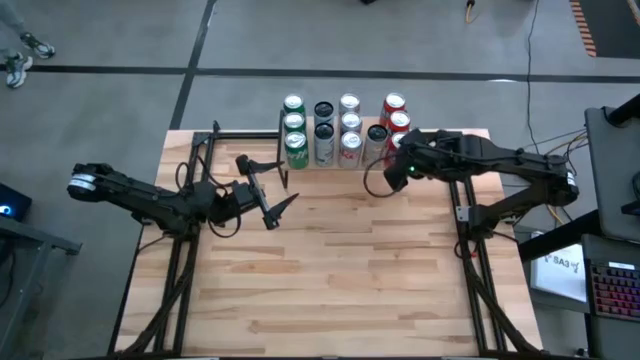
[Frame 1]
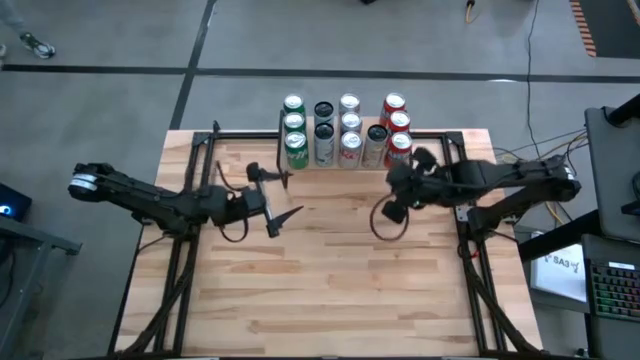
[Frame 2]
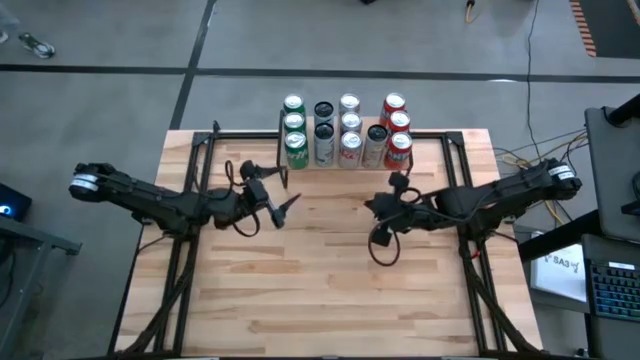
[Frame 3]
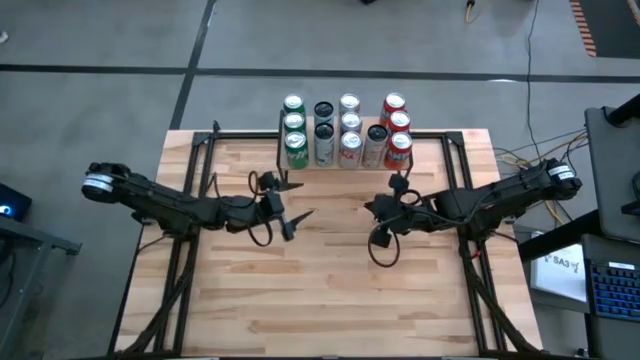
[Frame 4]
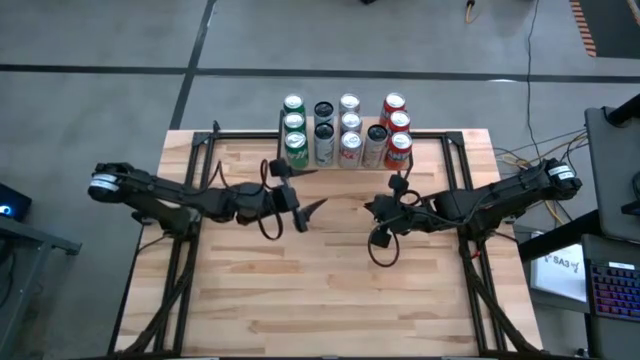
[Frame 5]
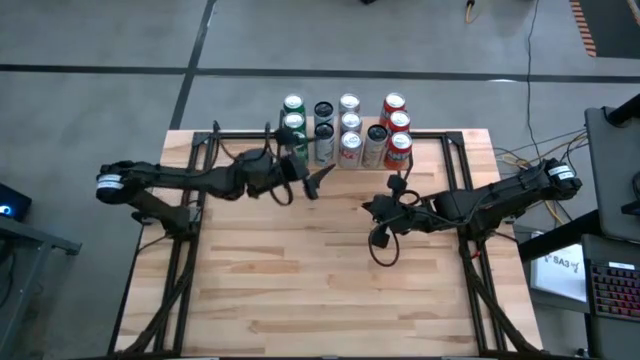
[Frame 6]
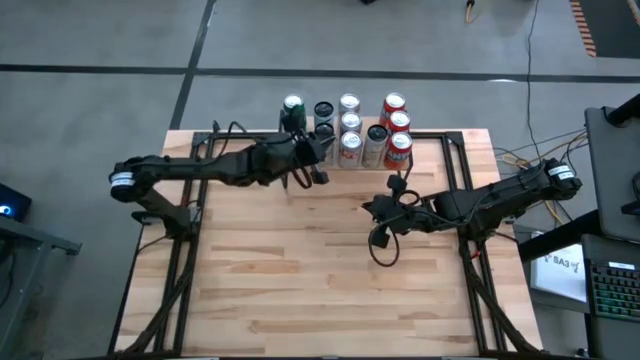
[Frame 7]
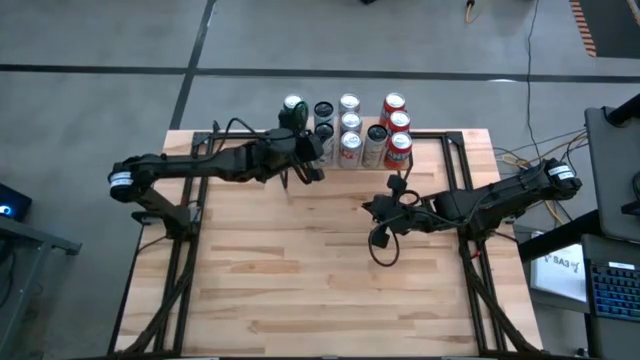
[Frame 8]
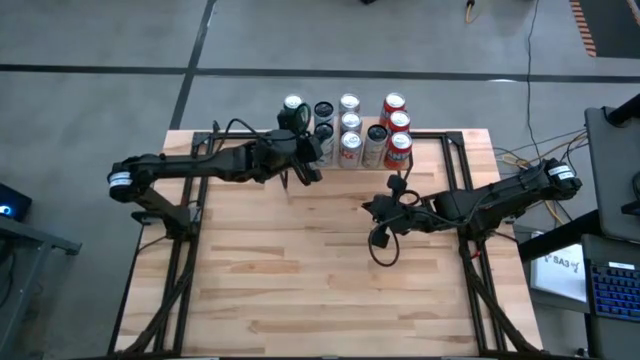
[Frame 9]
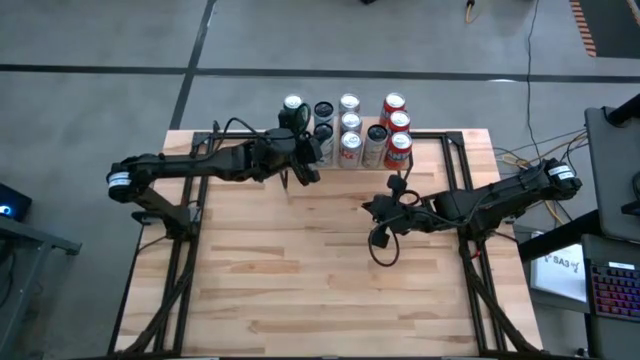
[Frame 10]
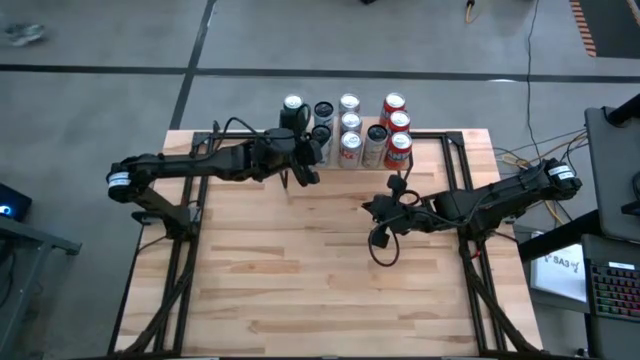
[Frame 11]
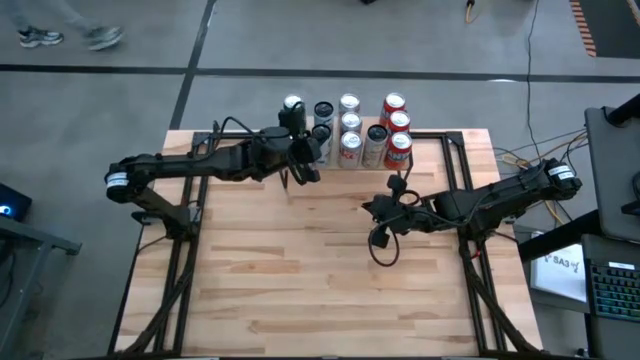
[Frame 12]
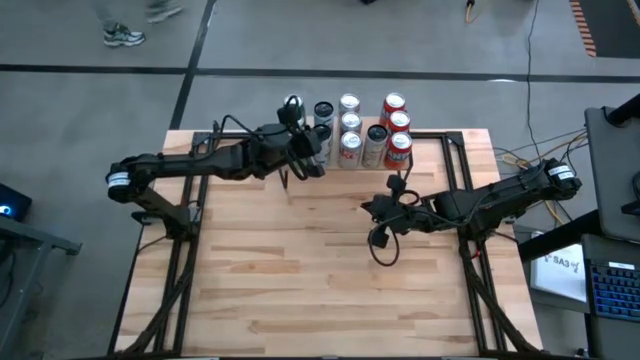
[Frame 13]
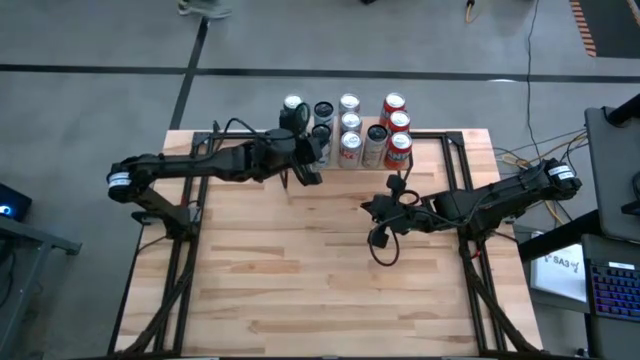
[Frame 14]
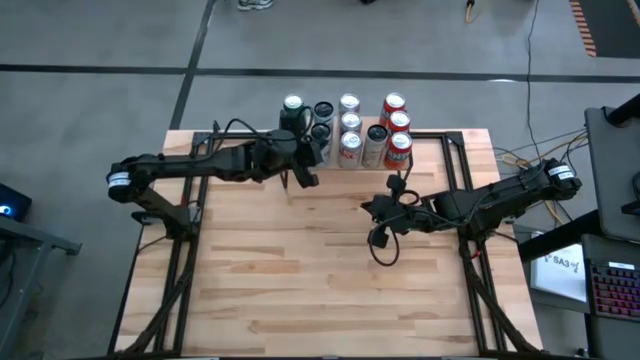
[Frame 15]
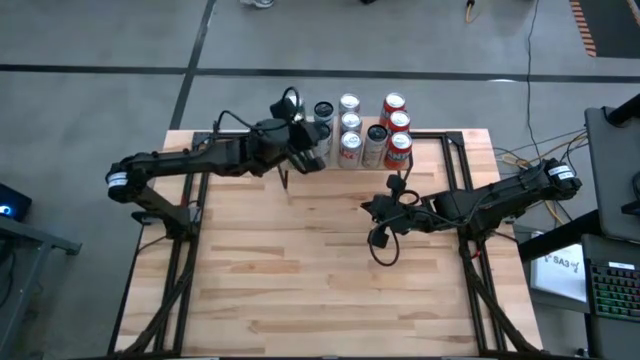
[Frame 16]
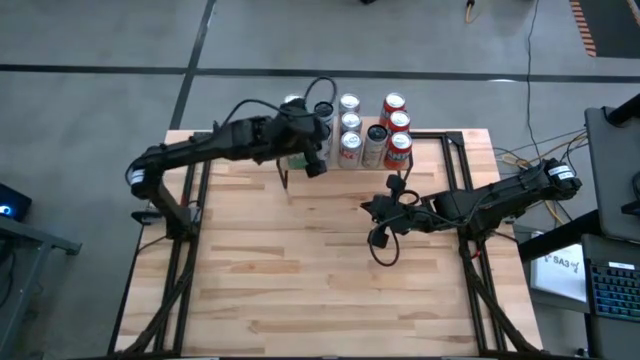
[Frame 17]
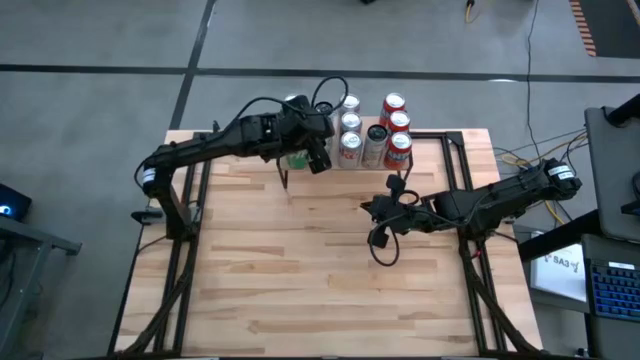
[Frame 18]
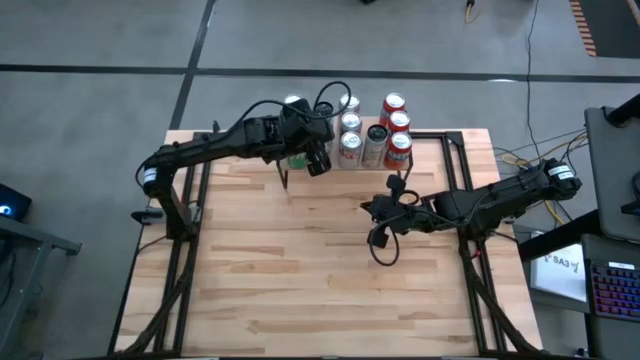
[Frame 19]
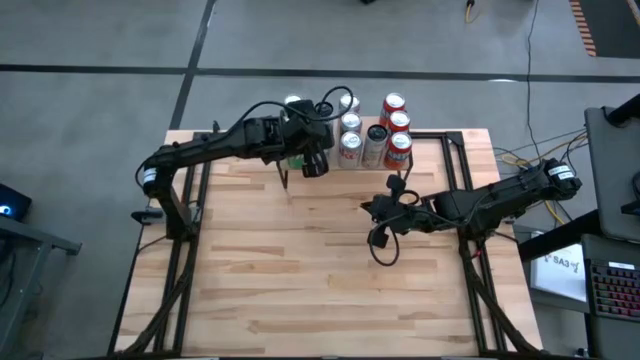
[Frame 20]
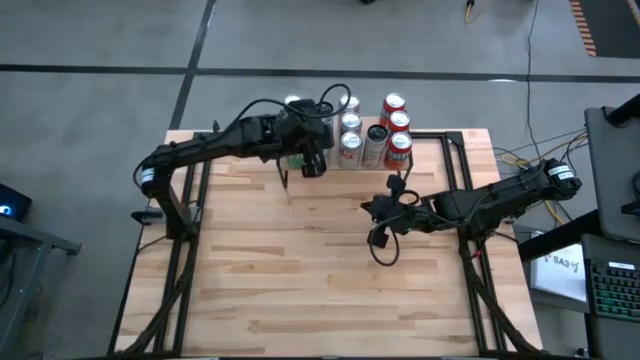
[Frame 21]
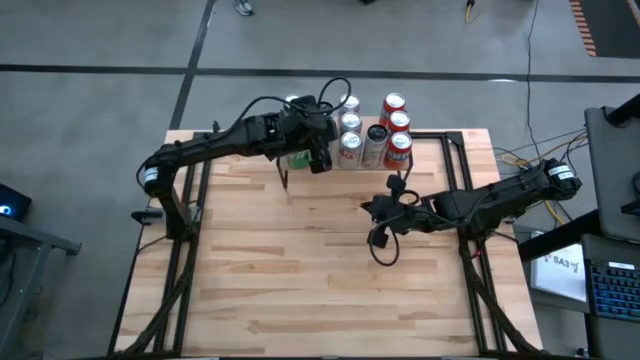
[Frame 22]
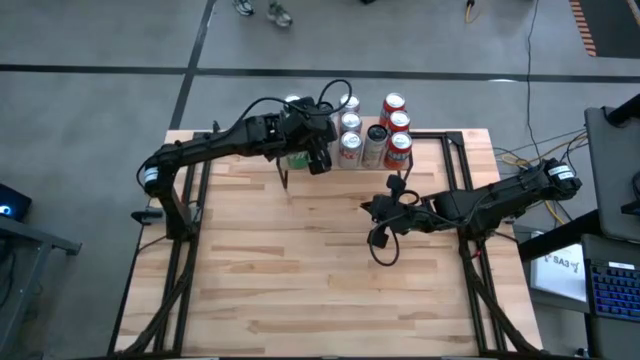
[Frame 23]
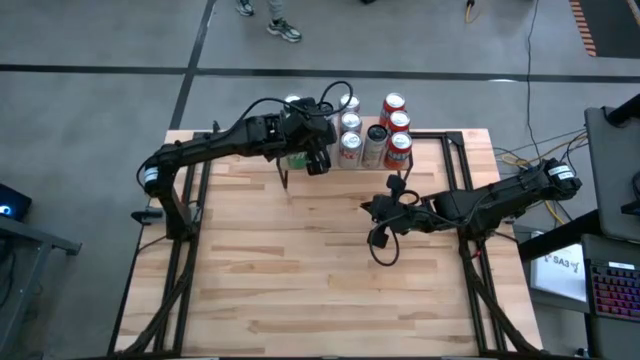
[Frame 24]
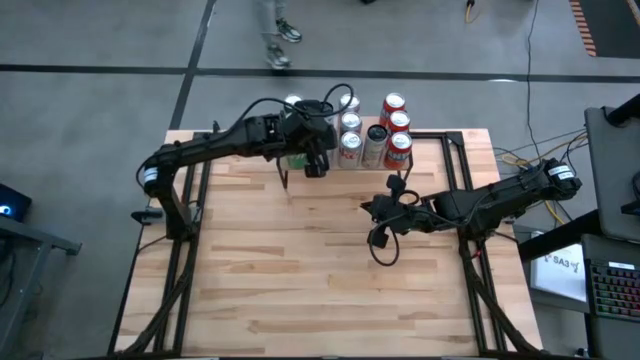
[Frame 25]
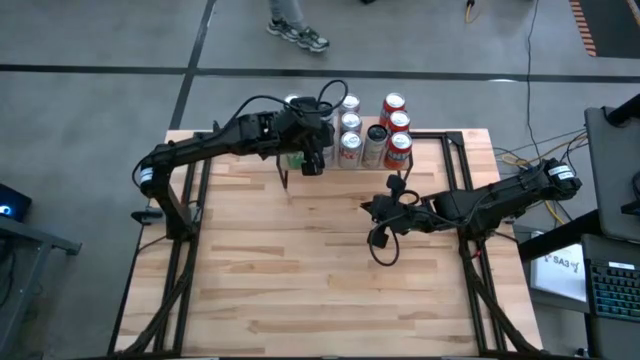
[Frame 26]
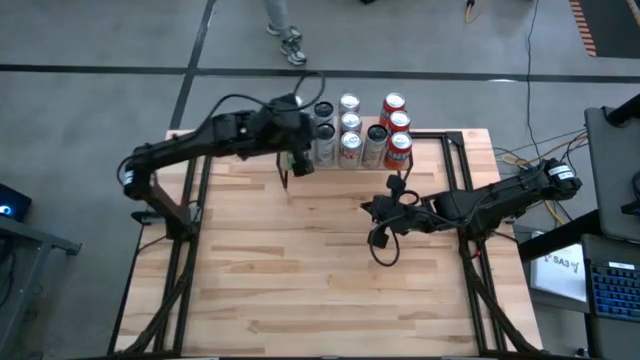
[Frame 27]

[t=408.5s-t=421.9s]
Task: Place canned beverage on shelf
Adjust the soda cans on the shelf
